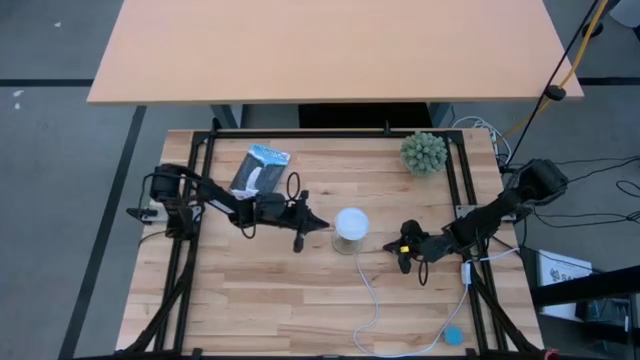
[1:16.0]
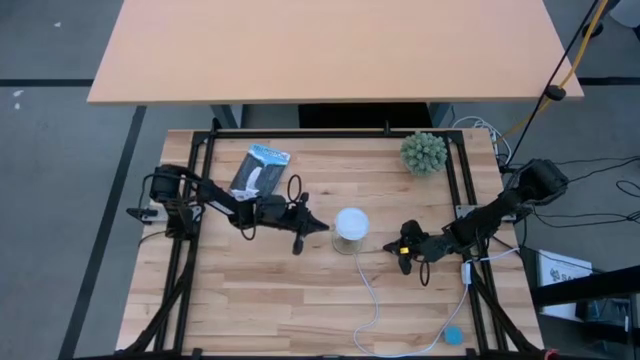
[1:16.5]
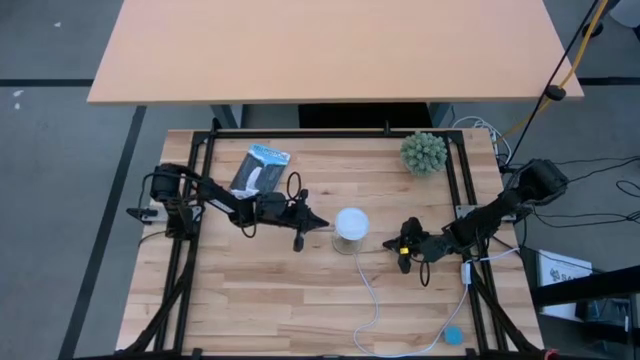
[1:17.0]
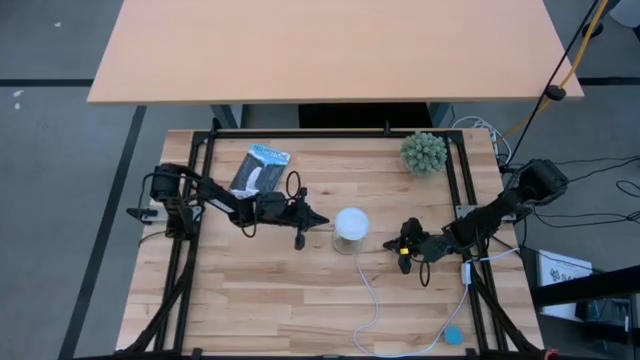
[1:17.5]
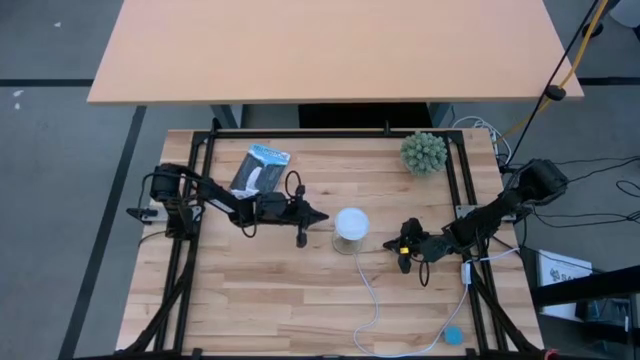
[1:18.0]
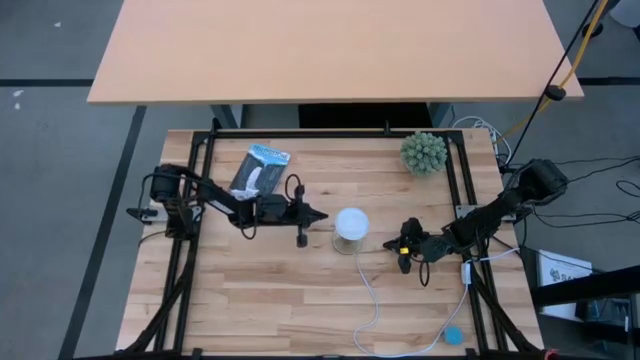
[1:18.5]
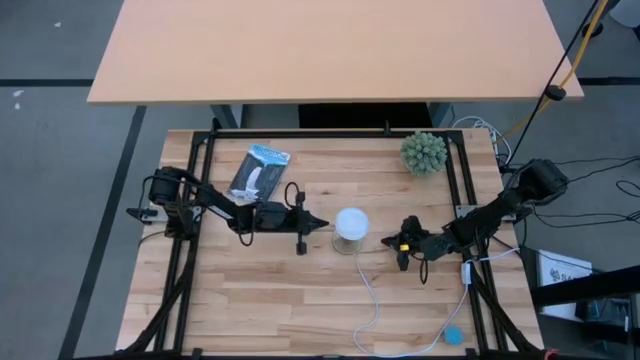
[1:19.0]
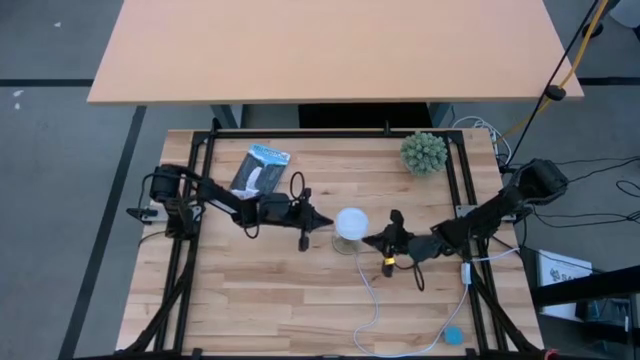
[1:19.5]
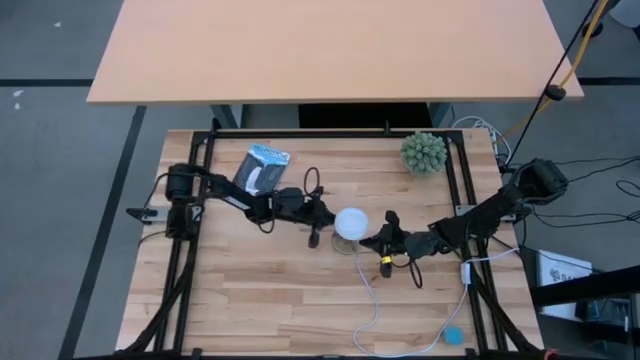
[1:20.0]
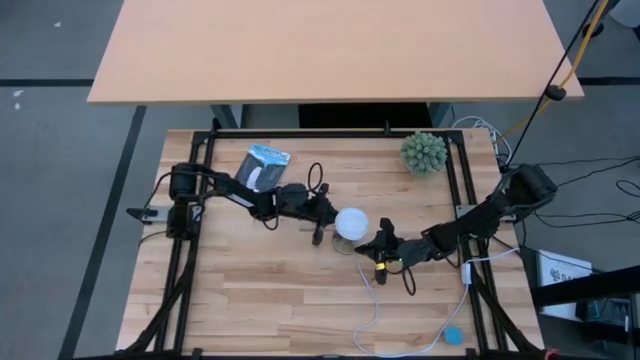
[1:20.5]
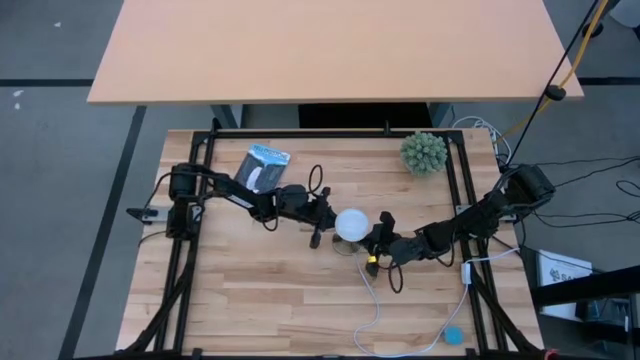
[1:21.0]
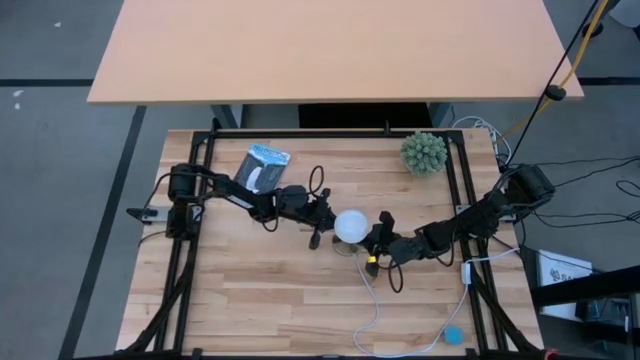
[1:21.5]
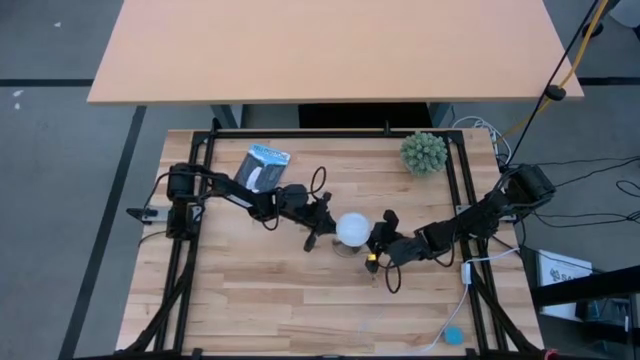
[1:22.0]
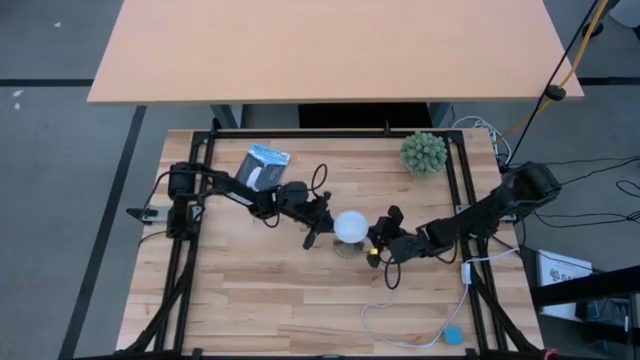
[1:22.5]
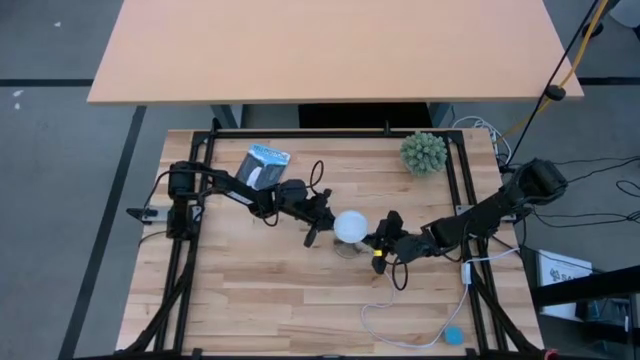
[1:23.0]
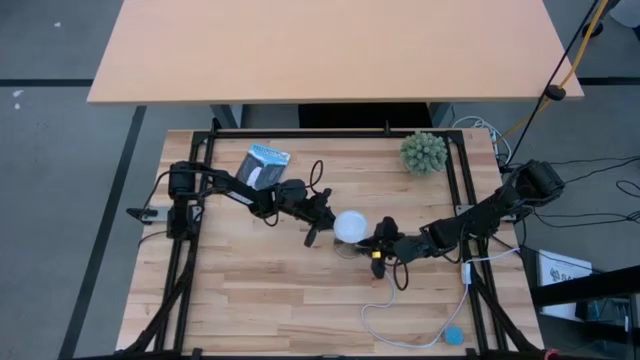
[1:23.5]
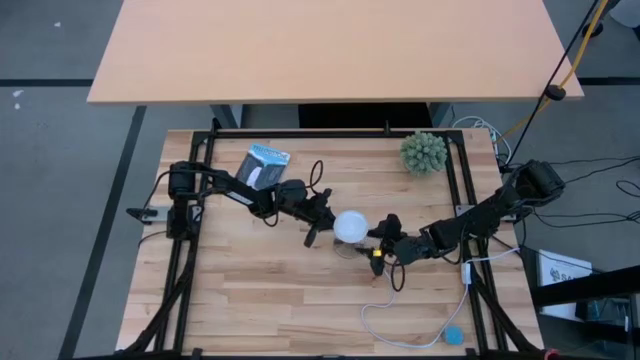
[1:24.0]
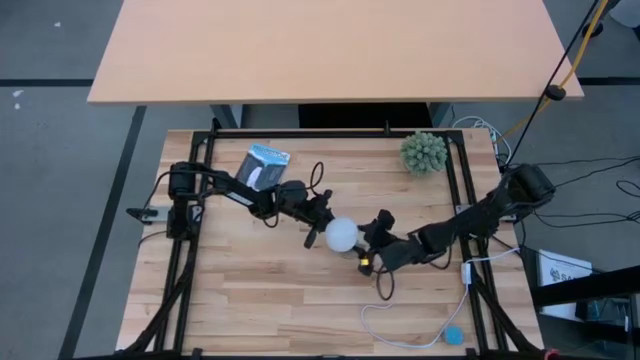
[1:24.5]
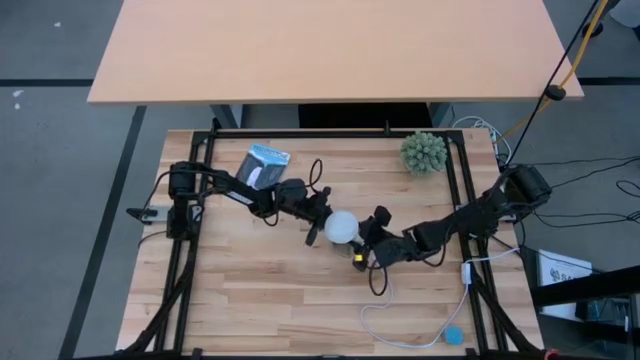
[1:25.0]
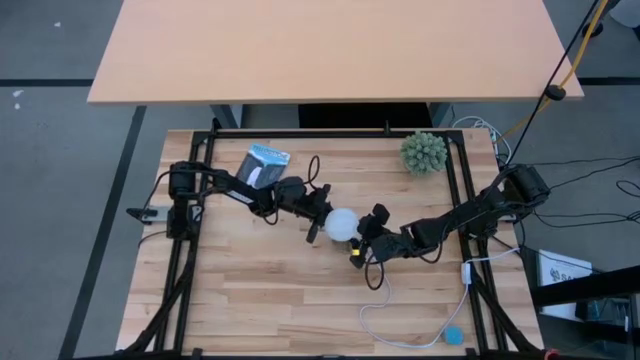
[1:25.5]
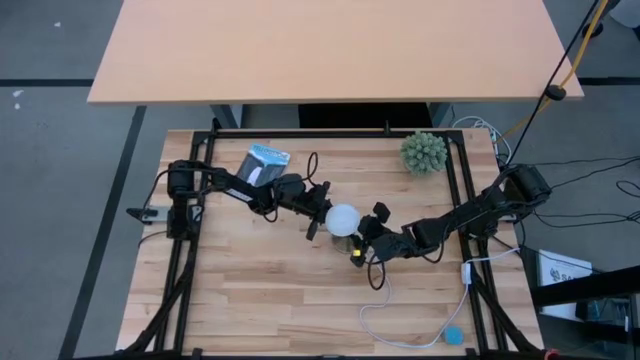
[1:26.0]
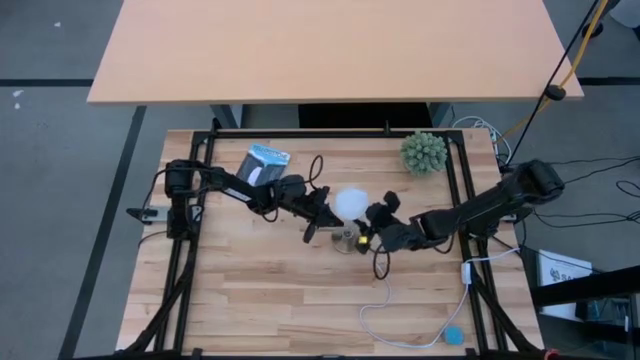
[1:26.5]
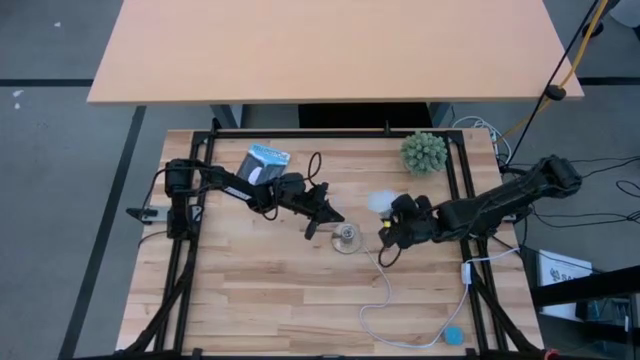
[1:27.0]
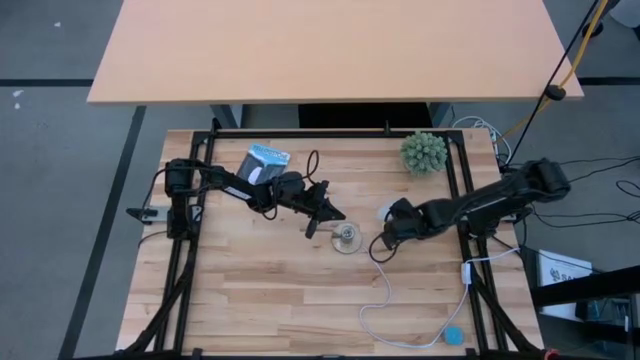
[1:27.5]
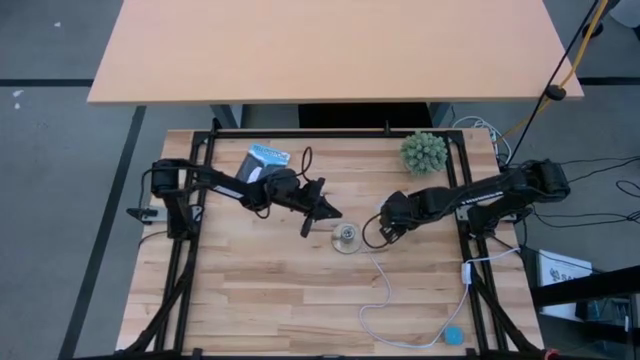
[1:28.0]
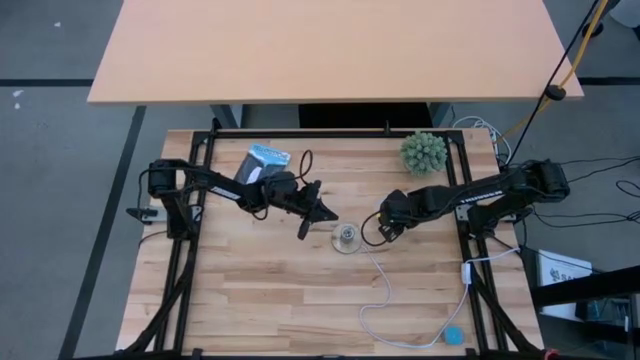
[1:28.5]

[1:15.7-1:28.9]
Task: Screw lightbulb
Remove the white lightbulb from the gold lamp

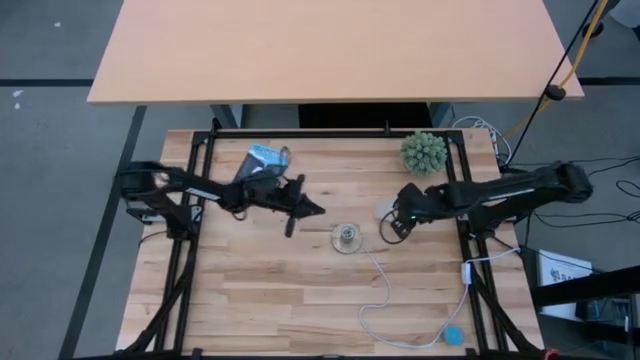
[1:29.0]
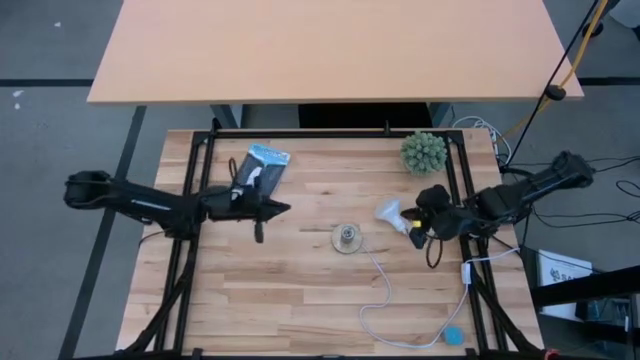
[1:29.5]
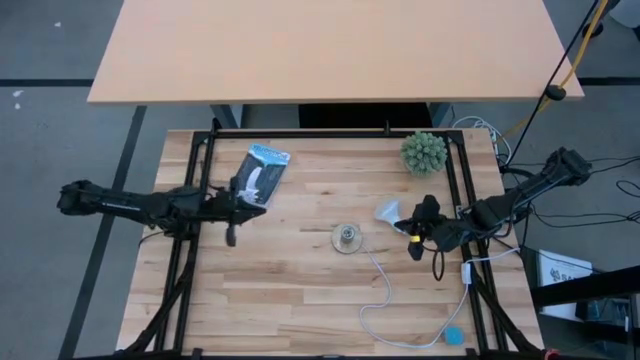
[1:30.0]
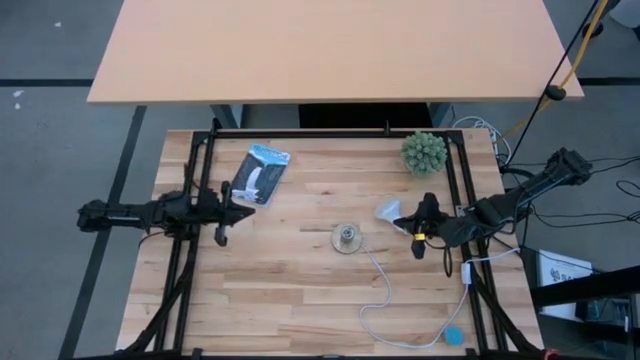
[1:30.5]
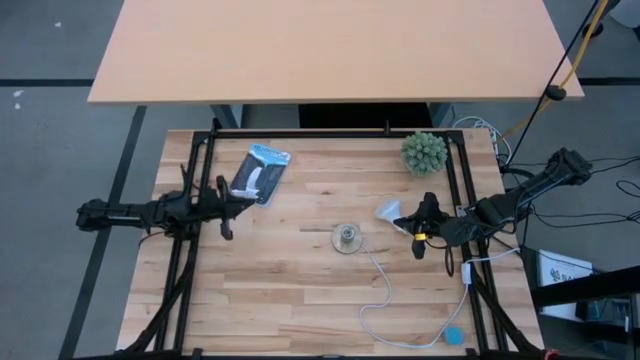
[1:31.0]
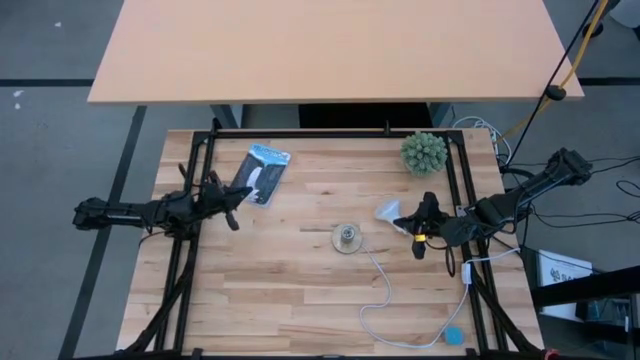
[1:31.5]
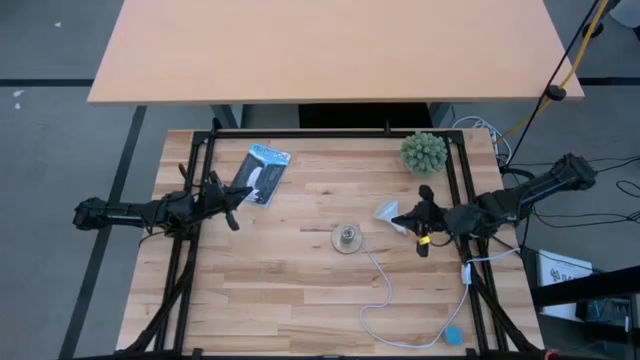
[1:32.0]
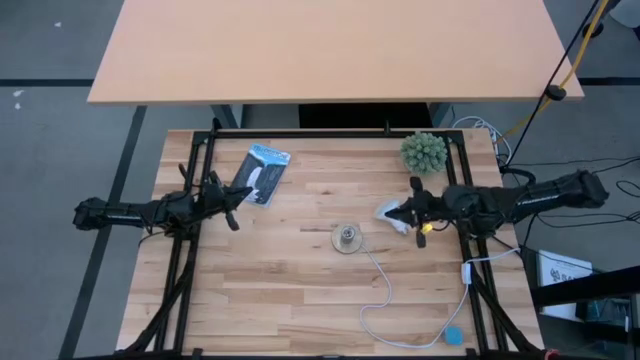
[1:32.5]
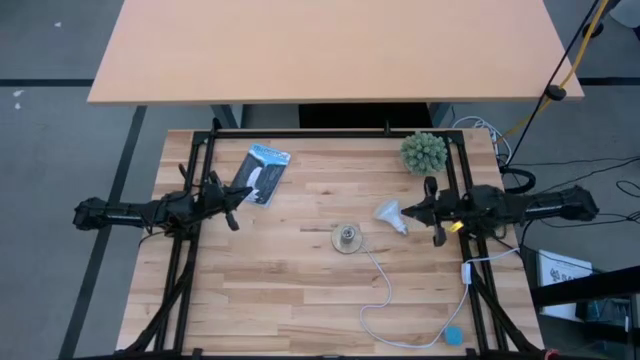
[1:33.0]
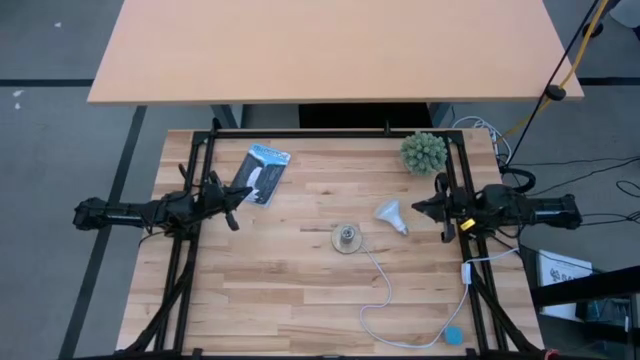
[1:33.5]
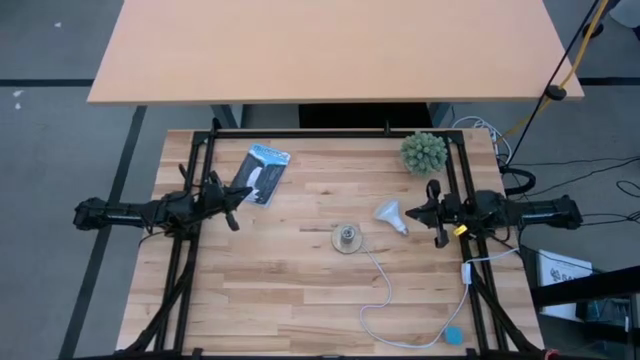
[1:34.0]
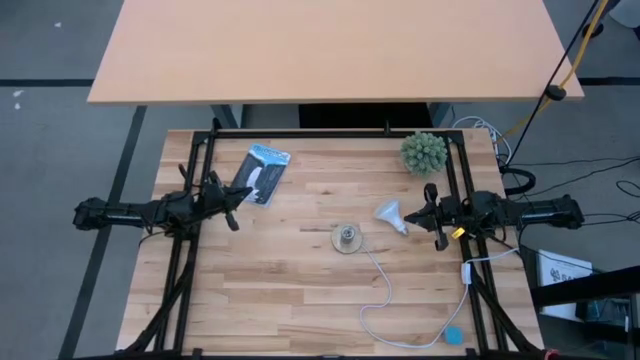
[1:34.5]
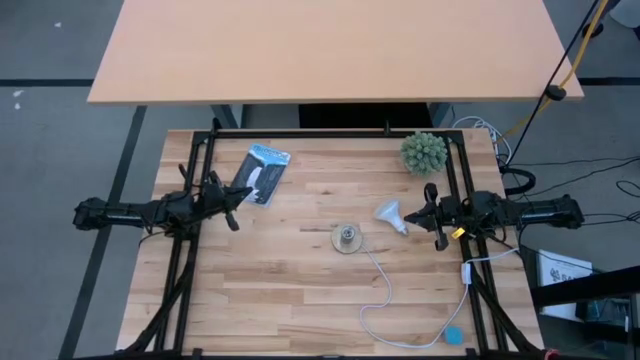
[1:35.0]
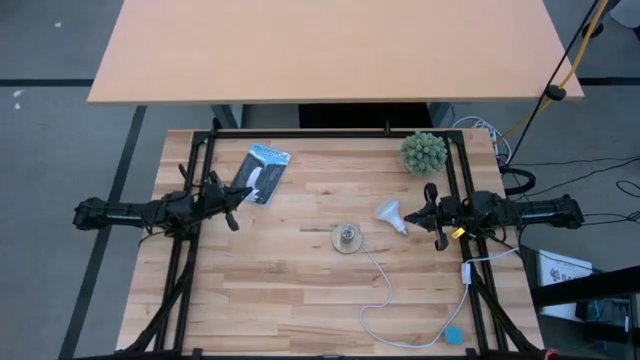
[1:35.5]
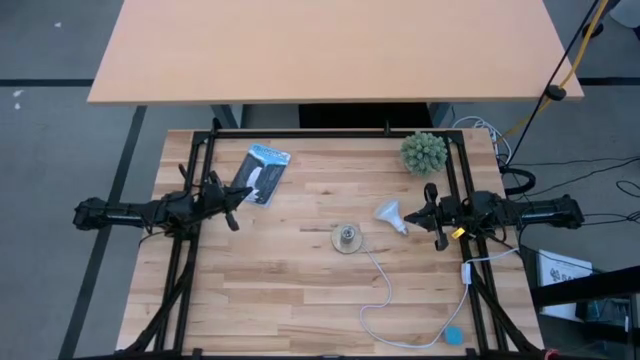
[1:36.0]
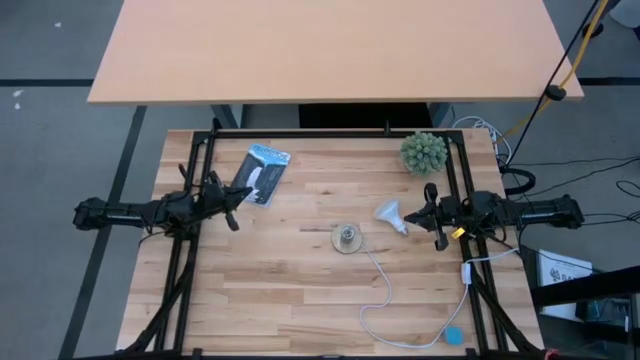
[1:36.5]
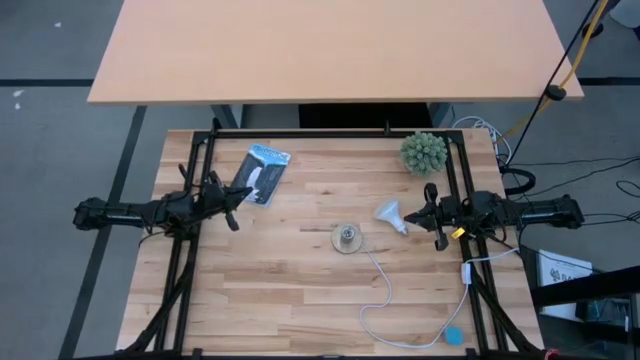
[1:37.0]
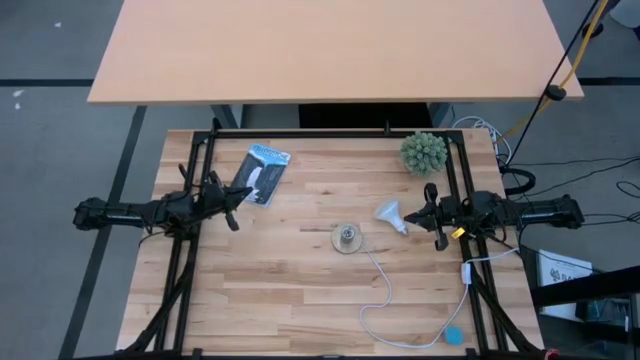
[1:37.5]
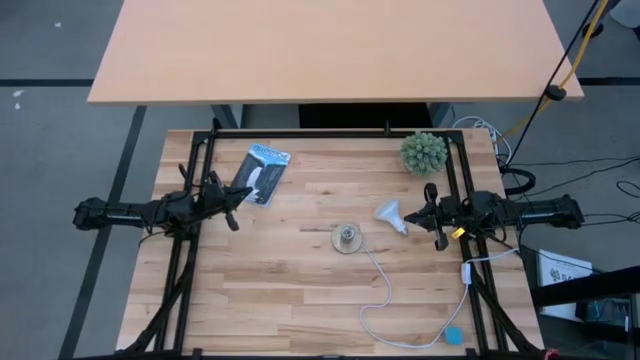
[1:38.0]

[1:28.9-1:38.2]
Return to home position
